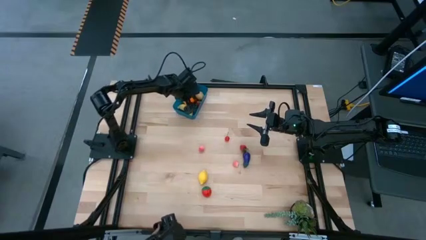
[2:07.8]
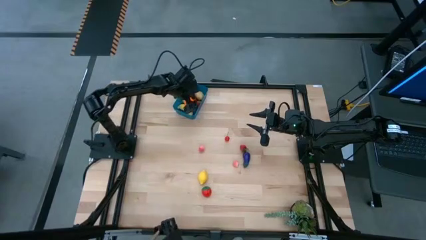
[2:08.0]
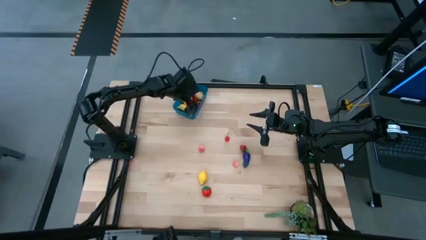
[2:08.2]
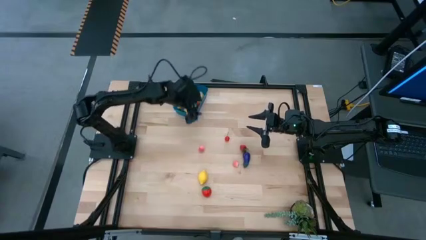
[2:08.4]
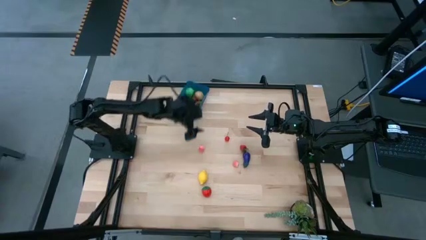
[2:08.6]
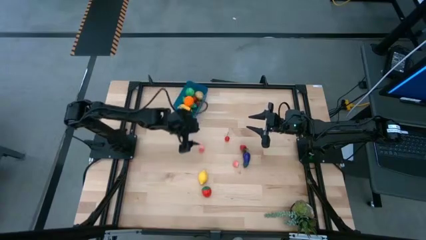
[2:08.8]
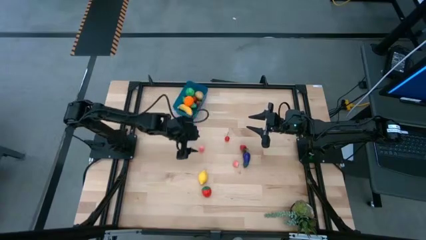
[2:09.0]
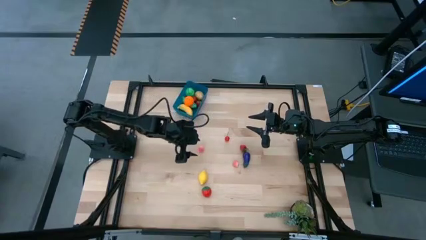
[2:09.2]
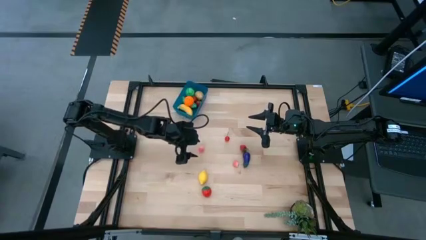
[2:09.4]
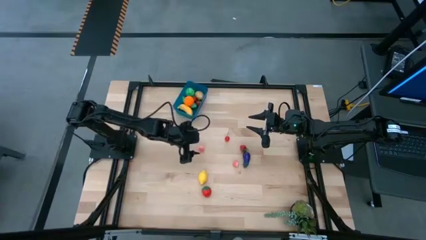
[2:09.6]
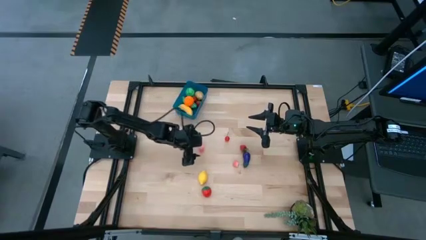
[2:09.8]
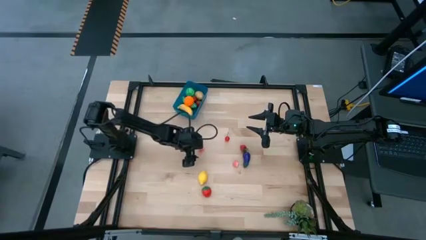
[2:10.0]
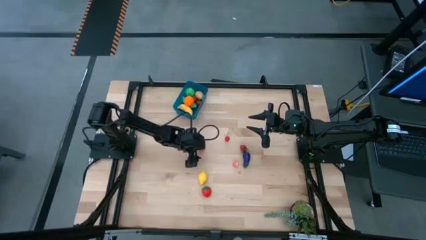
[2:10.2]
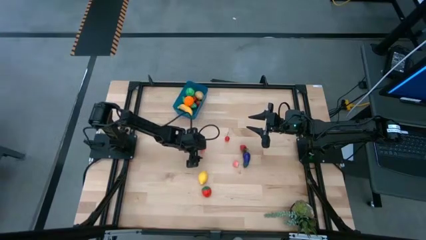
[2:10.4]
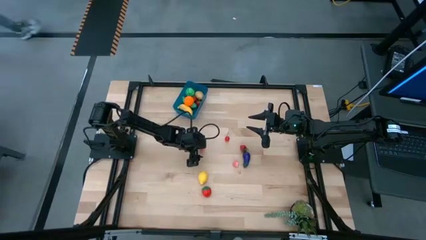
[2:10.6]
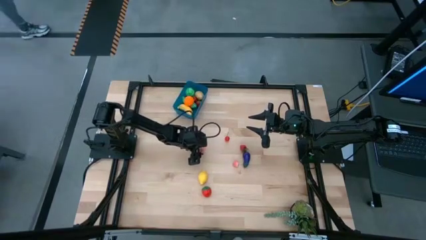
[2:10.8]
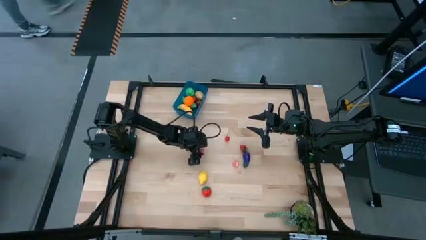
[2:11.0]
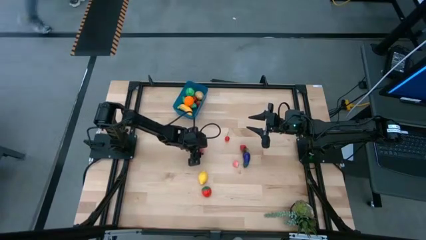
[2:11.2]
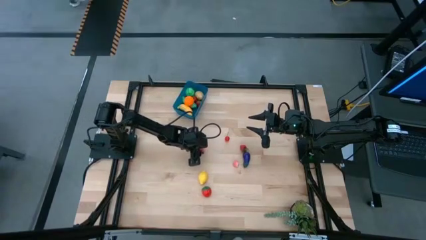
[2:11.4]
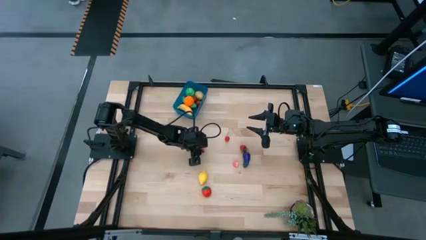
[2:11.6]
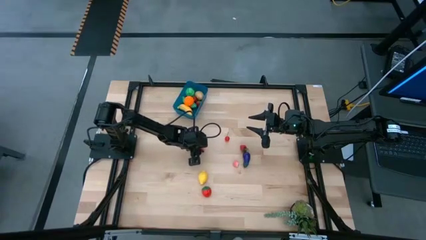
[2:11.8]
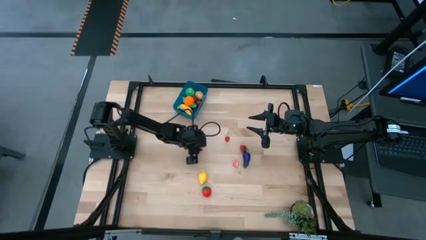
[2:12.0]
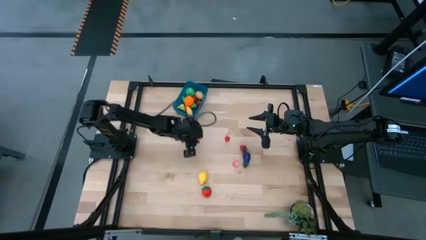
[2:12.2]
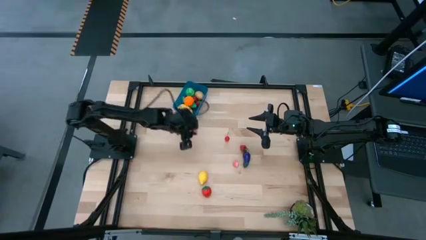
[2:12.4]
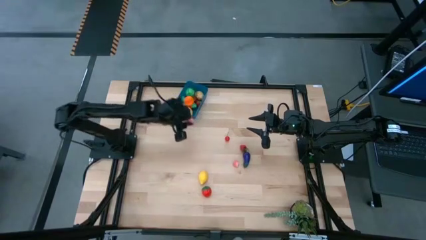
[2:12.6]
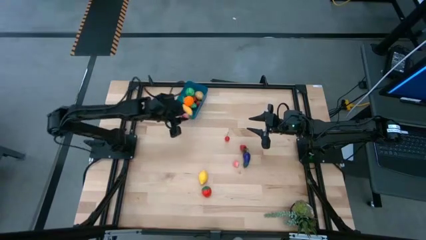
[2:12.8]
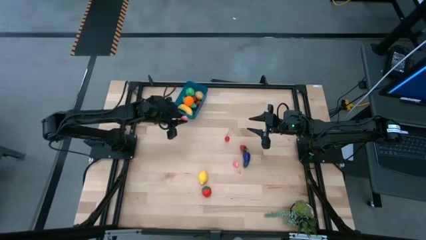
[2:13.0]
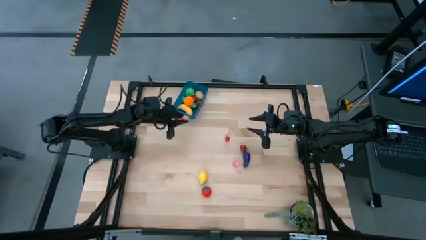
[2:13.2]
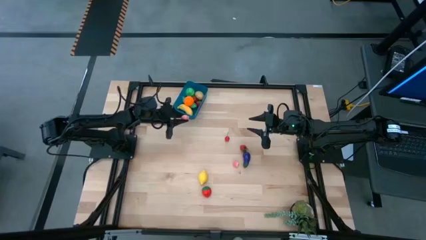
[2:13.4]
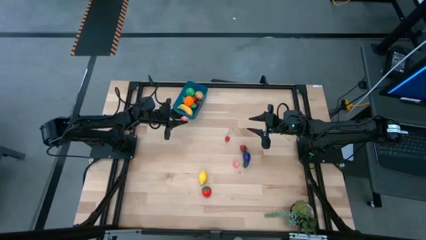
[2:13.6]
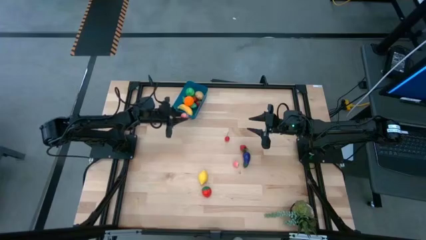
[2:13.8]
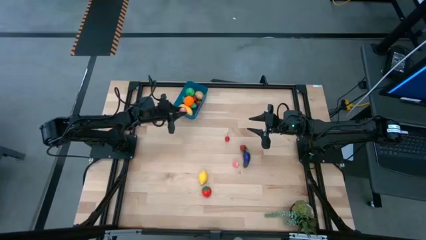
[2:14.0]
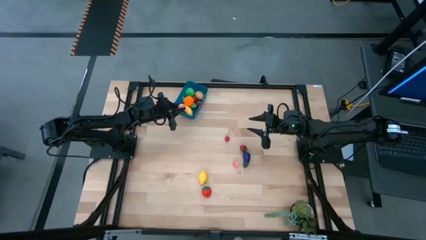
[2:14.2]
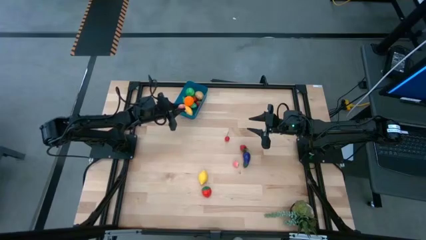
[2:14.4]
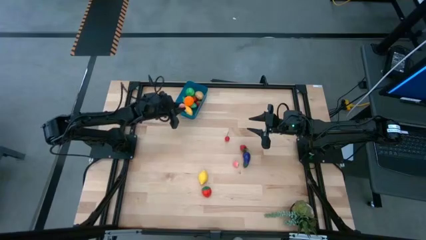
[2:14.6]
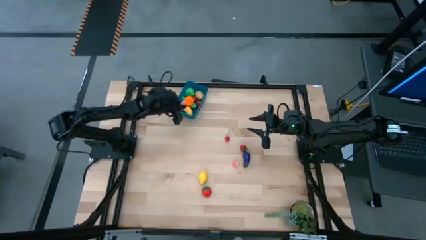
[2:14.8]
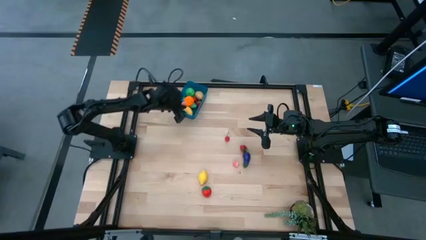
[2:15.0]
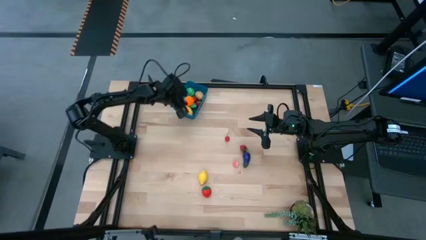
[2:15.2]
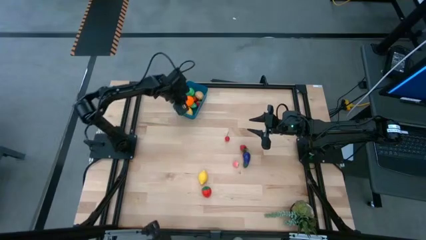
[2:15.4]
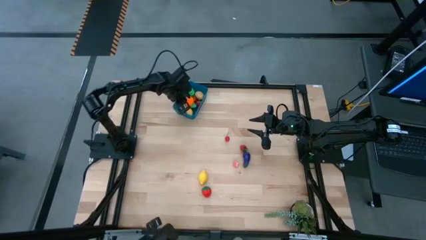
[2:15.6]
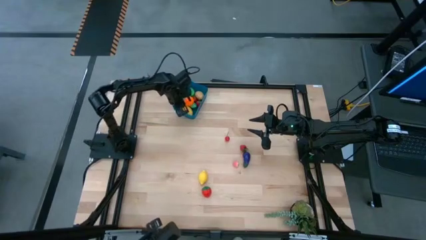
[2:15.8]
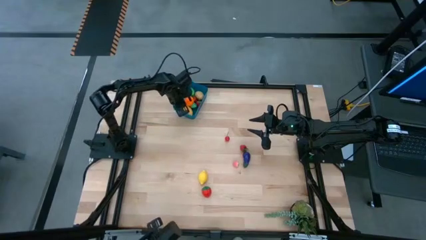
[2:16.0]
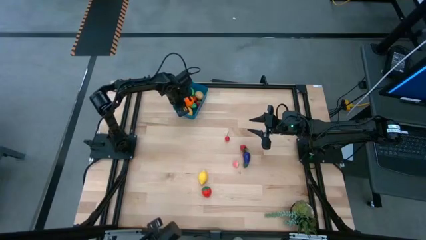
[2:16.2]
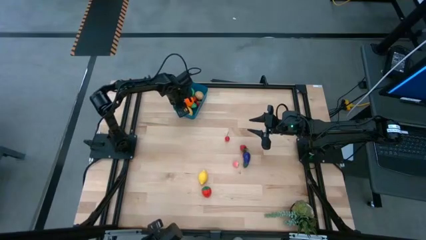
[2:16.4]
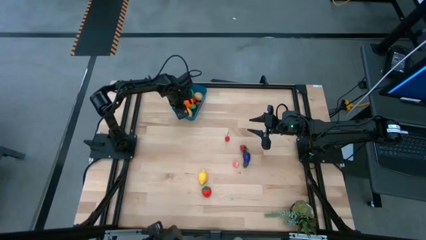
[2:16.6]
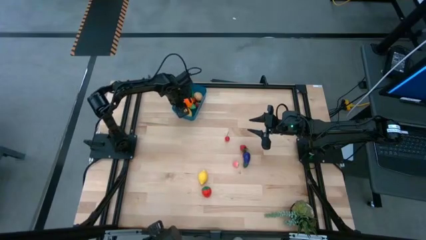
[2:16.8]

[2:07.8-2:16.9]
Task: Pick and placing Produce into tupperware
Put the left pink peach into the blue bin

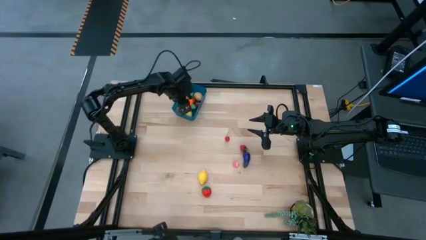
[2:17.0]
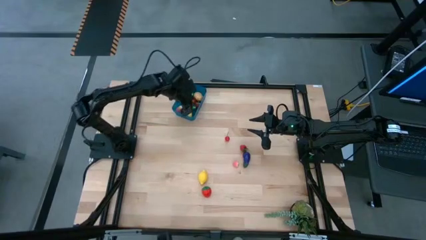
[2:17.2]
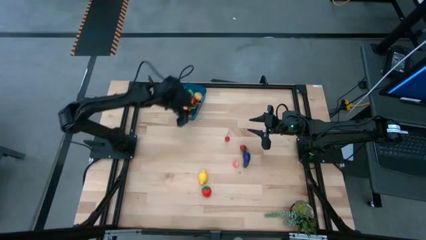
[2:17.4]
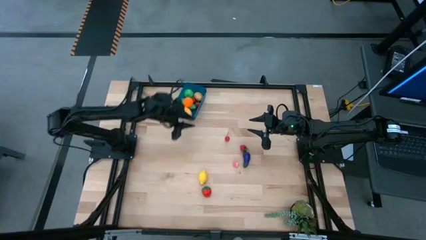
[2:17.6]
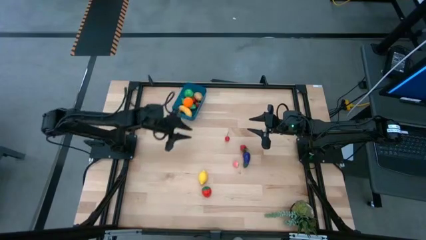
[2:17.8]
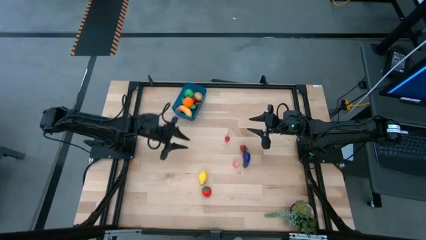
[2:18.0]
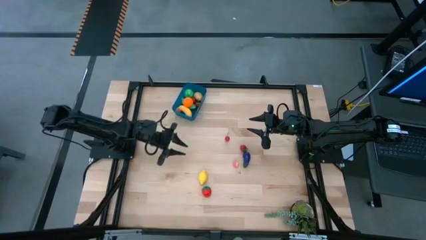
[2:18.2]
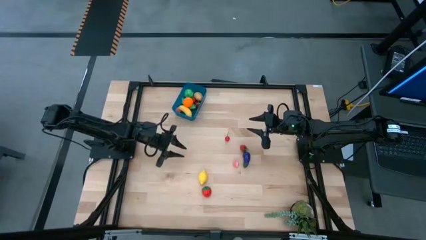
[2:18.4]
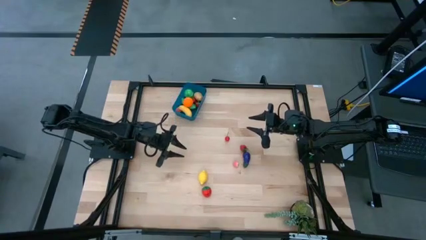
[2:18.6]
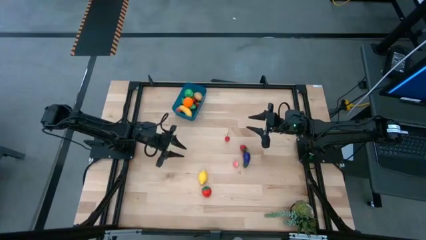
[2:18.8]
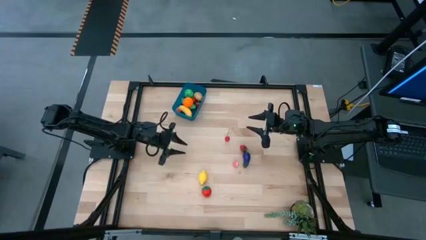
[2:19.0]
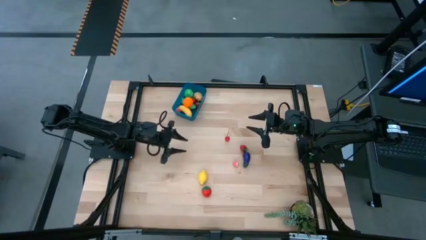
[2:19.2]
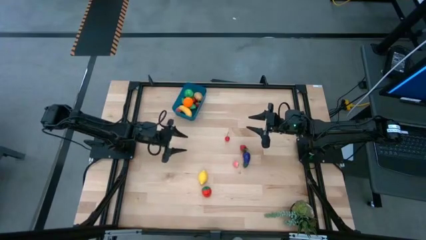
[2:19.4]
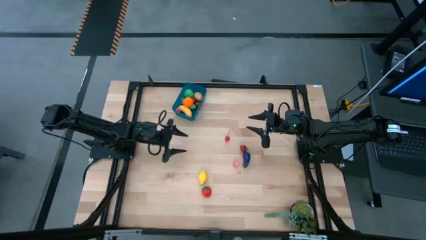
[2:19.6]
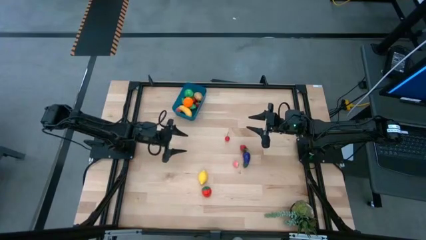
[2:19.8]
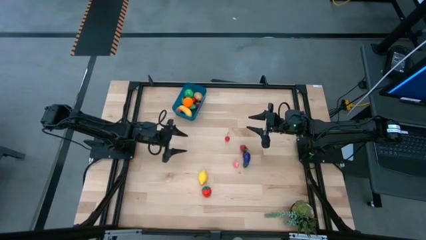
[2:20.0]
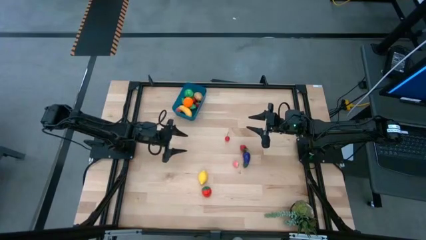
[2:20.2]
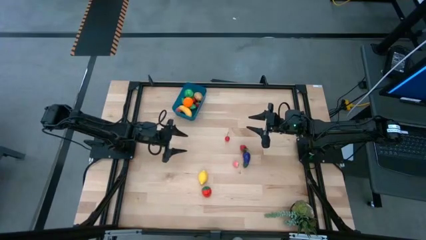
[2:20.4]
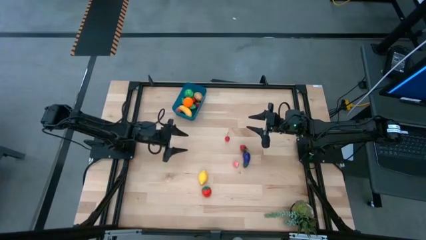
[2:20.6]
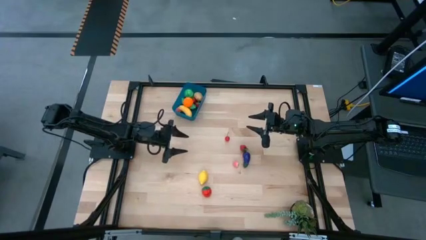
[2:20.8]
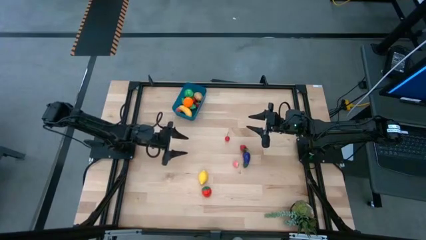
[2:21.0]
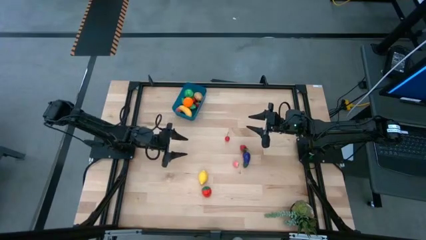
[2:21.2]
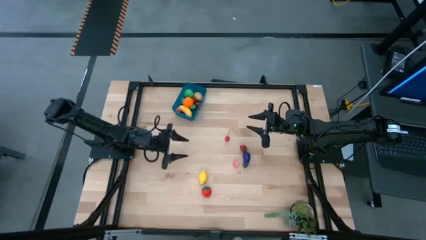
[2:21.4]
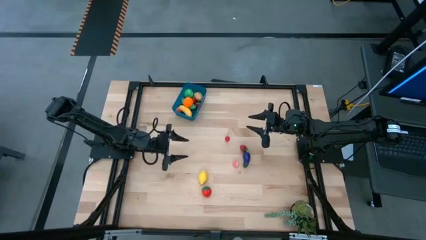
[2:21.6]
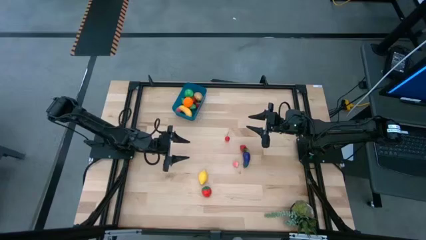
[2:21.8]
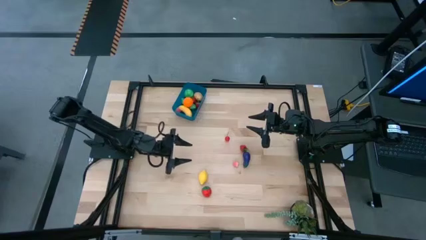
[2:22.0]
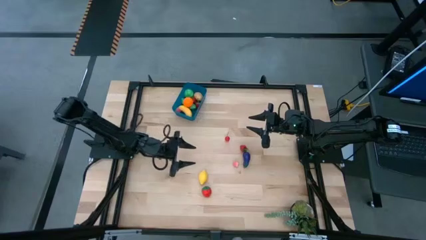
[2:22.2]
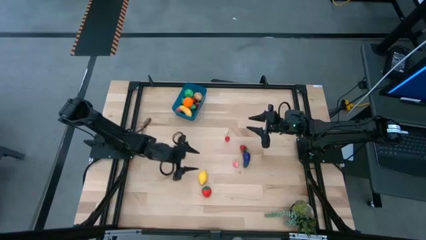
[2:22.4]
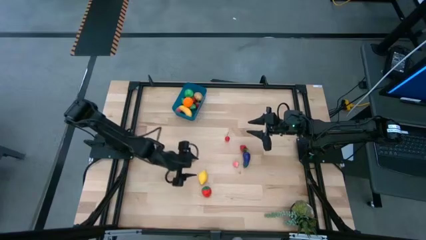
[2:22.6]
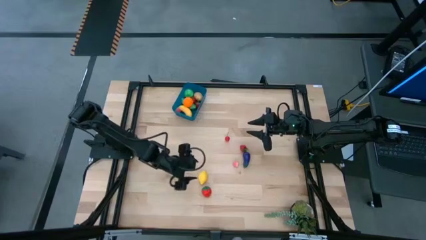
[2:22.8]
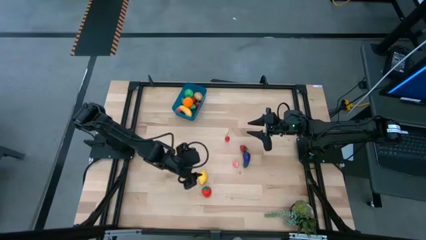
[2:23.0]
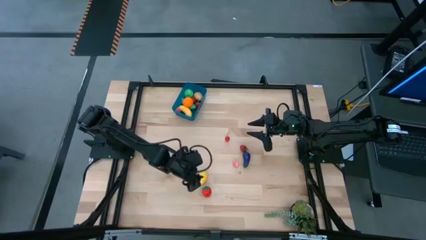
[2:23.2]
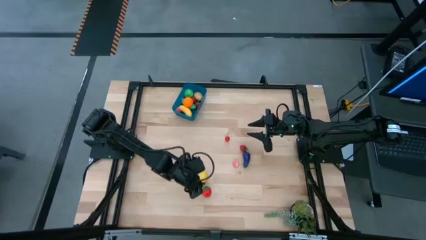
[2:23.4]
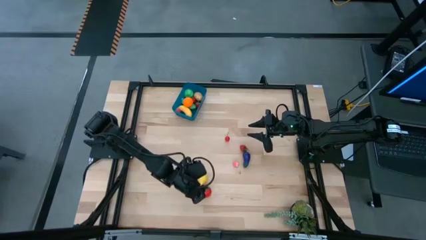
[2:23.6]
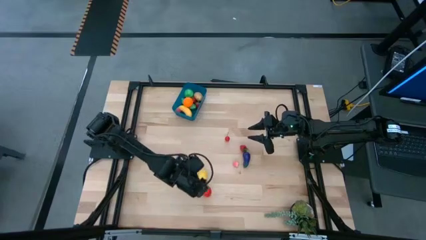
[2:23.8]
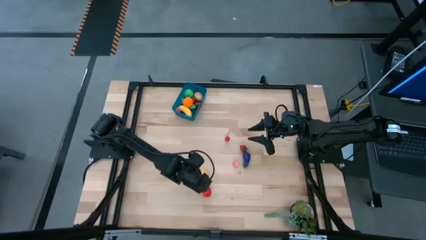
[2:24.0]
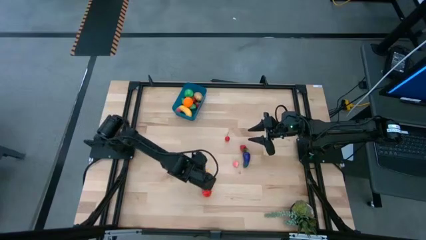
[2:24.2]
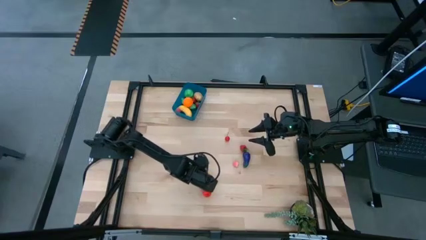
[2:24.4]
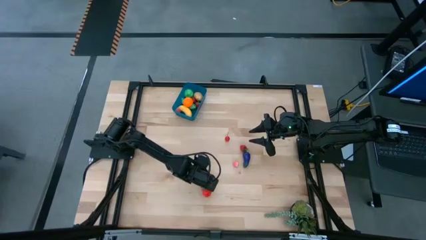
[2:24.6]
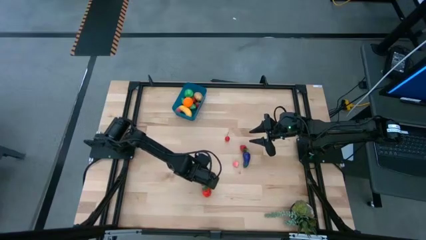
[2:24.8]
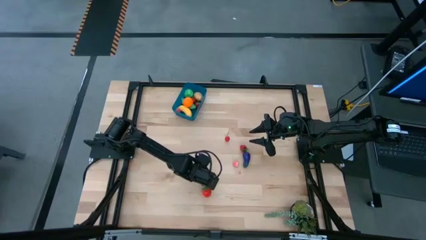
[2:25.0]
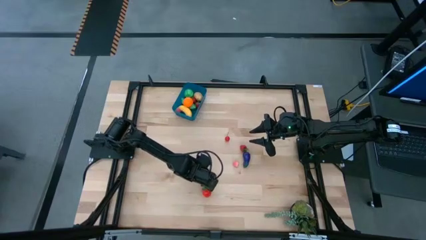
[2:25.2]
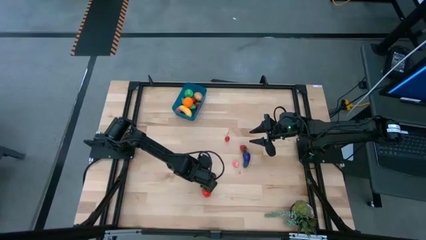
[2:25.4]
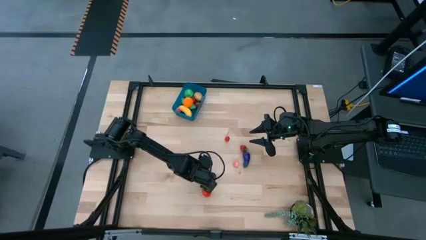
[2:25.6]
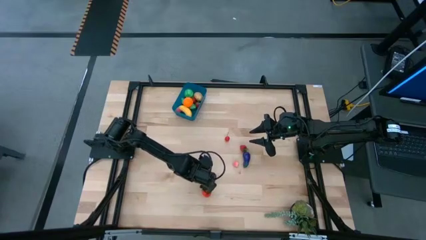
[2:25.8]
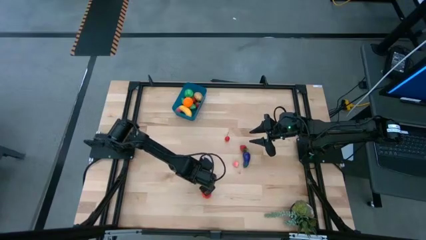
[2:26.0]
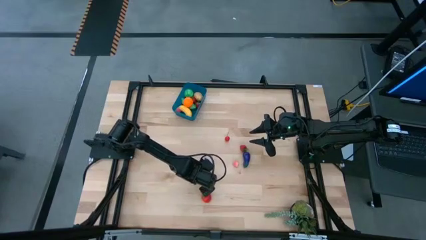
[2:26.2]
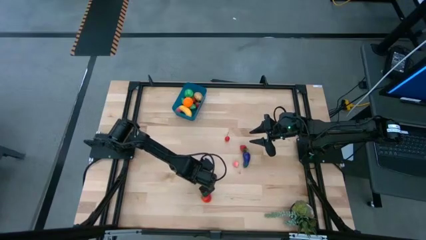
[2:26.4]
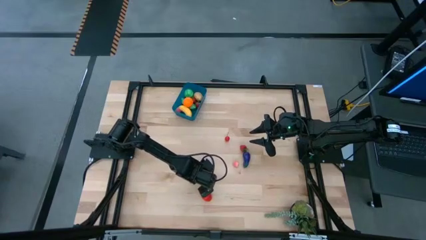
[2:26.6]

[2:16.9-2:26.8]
Put the yellow lemon into the blue bin
